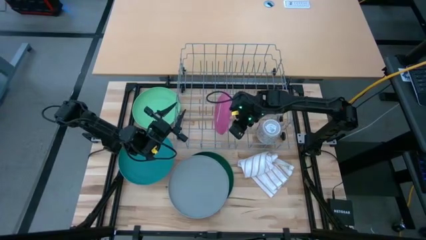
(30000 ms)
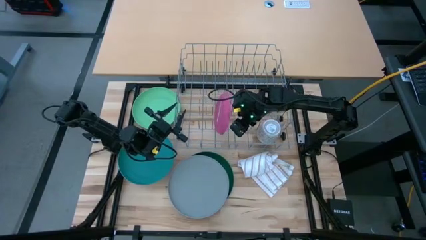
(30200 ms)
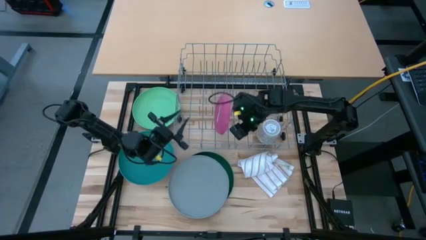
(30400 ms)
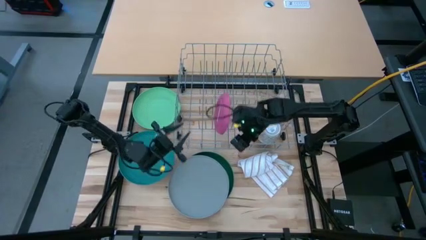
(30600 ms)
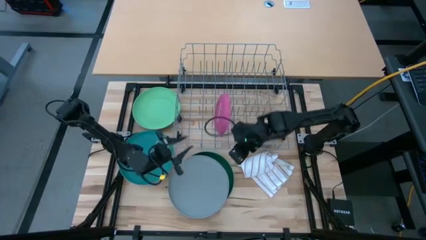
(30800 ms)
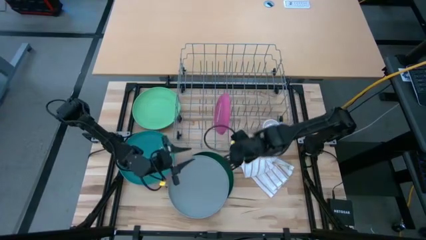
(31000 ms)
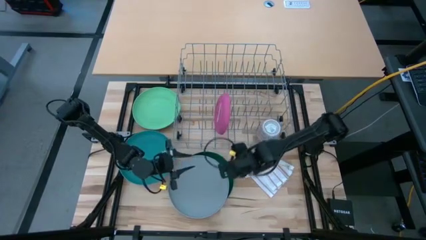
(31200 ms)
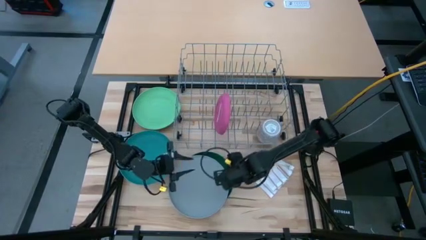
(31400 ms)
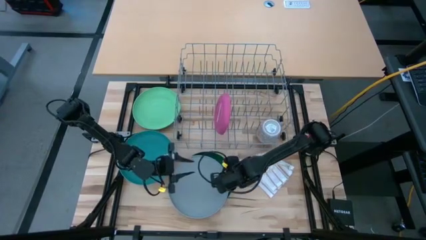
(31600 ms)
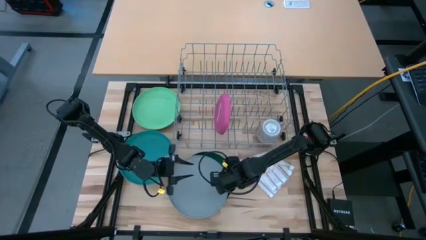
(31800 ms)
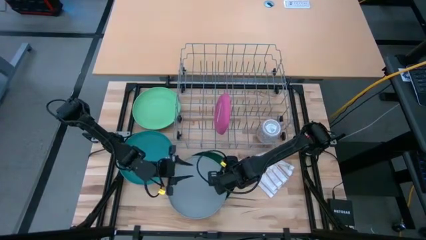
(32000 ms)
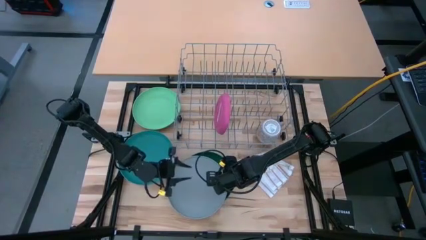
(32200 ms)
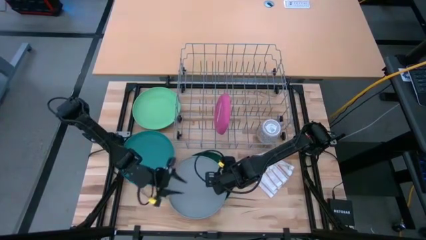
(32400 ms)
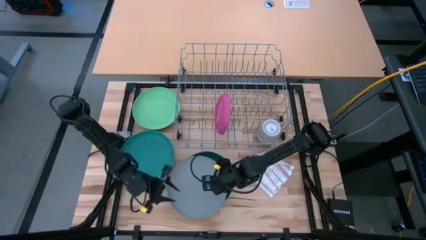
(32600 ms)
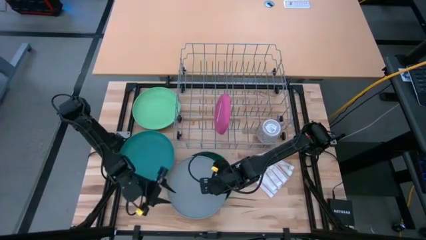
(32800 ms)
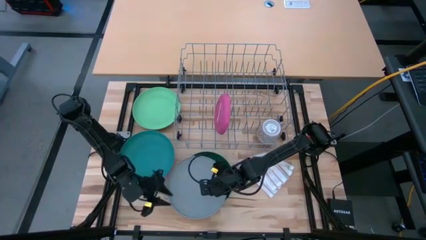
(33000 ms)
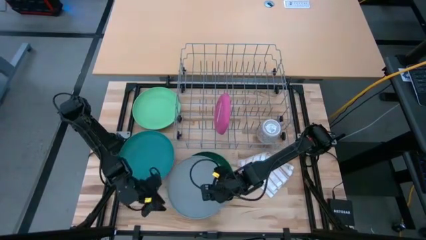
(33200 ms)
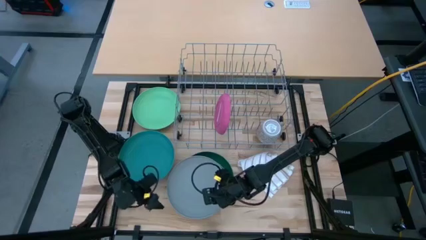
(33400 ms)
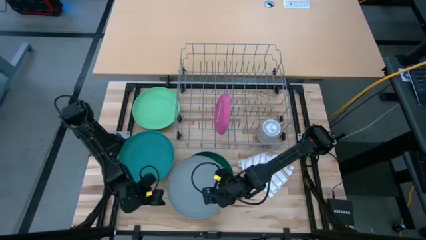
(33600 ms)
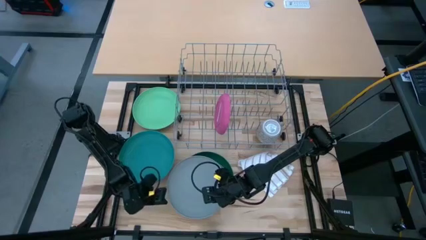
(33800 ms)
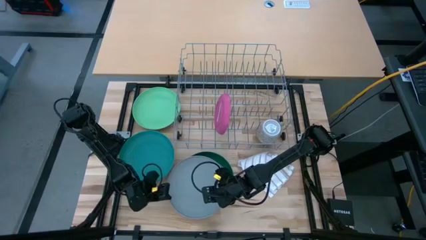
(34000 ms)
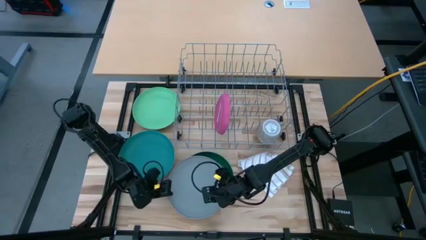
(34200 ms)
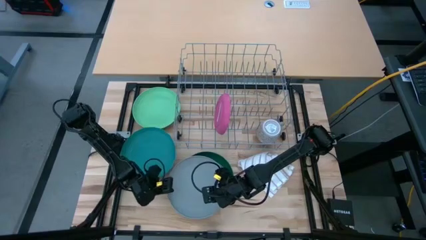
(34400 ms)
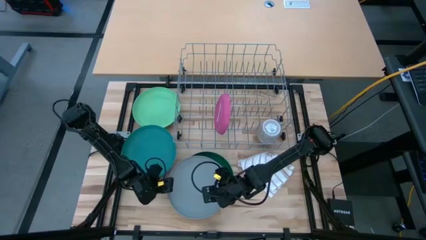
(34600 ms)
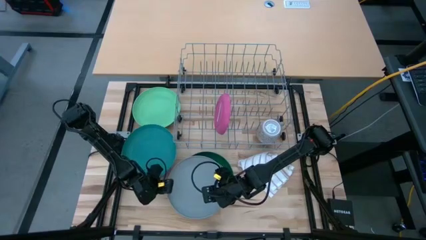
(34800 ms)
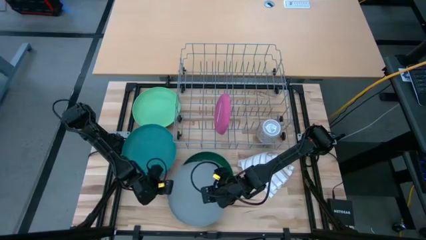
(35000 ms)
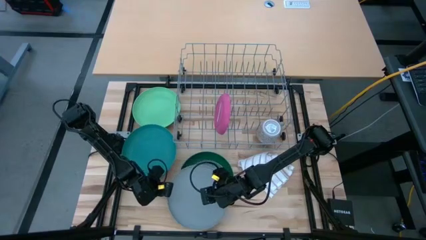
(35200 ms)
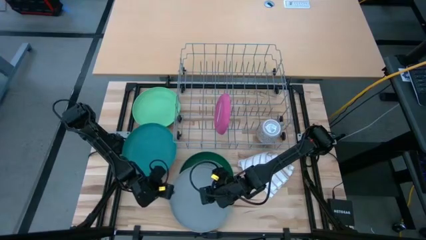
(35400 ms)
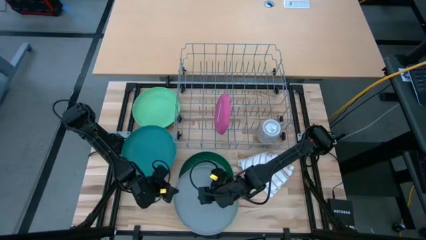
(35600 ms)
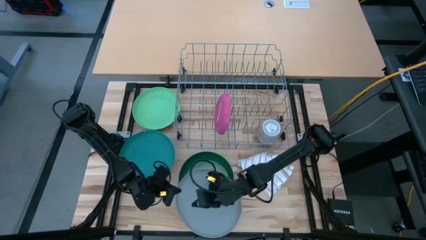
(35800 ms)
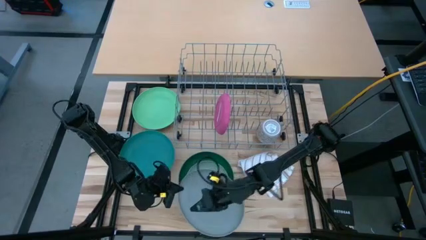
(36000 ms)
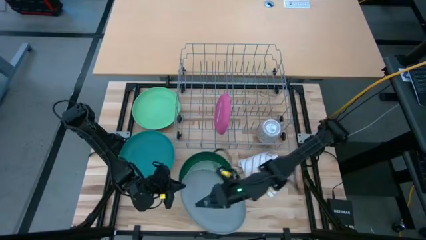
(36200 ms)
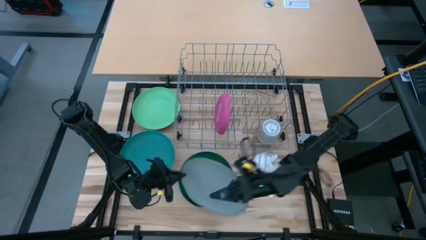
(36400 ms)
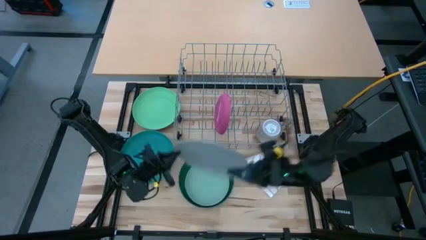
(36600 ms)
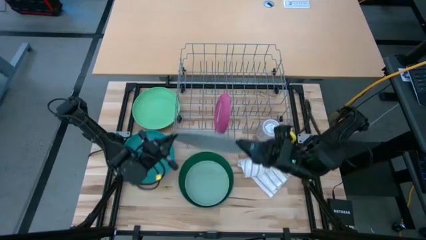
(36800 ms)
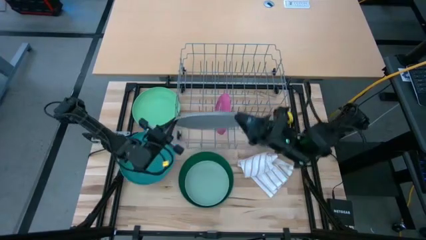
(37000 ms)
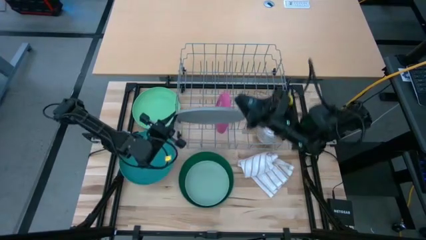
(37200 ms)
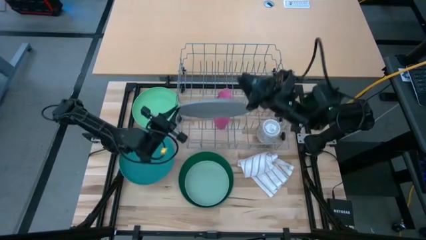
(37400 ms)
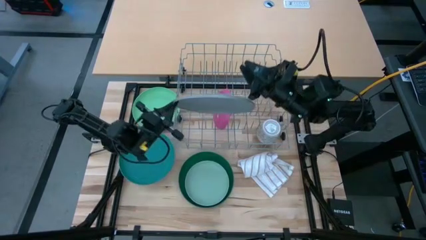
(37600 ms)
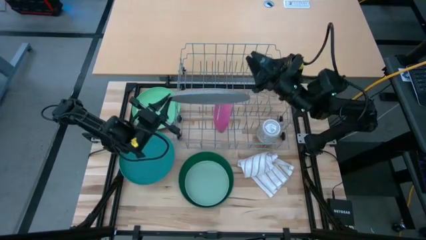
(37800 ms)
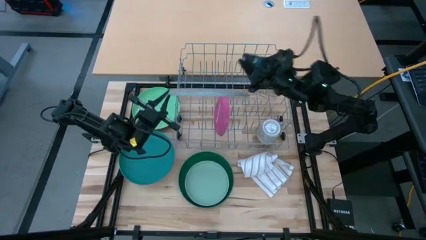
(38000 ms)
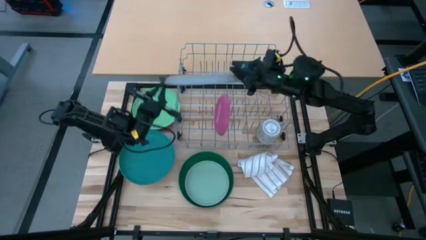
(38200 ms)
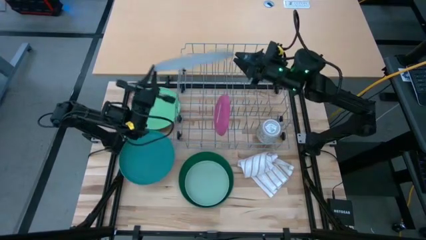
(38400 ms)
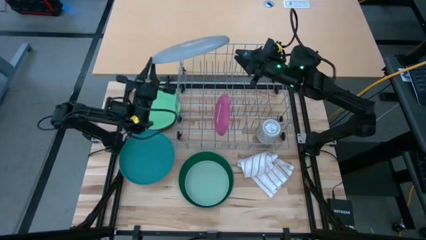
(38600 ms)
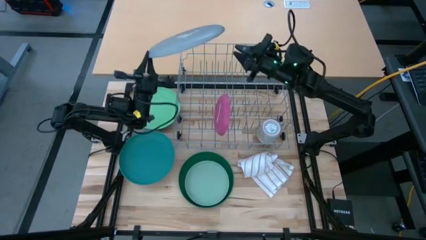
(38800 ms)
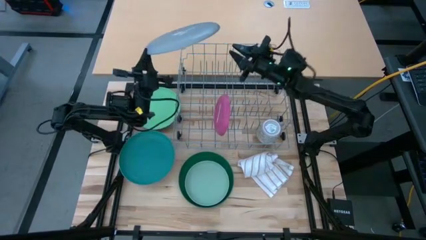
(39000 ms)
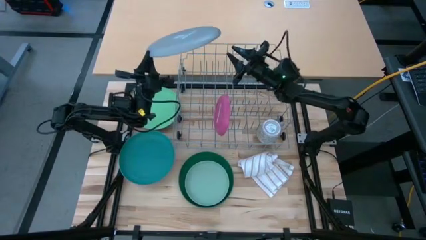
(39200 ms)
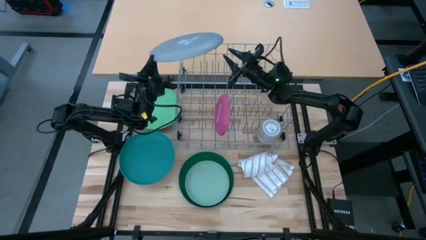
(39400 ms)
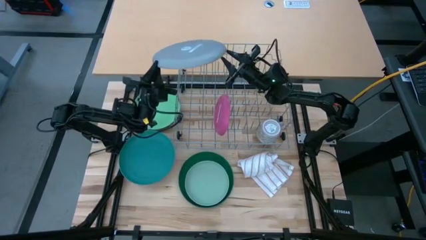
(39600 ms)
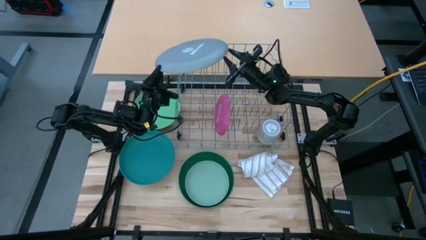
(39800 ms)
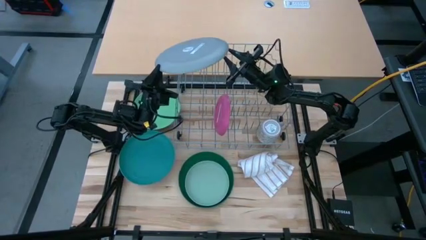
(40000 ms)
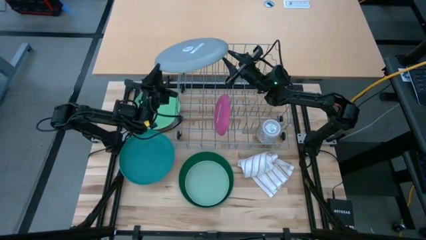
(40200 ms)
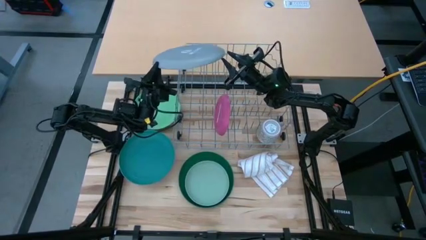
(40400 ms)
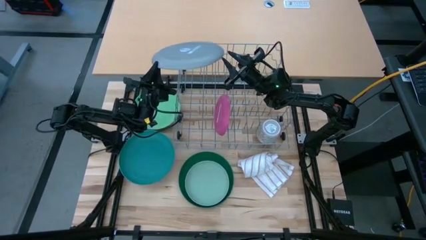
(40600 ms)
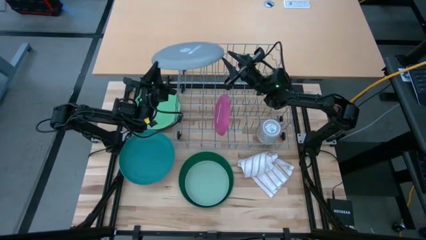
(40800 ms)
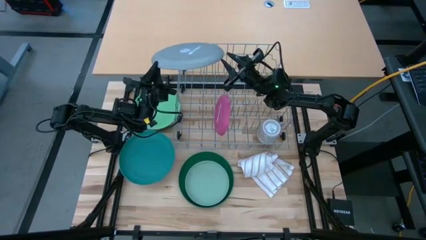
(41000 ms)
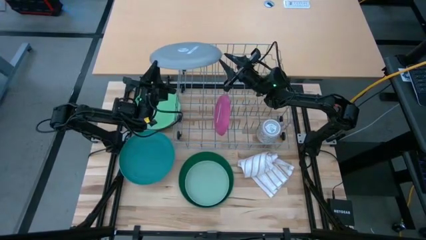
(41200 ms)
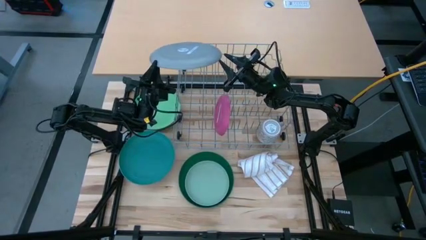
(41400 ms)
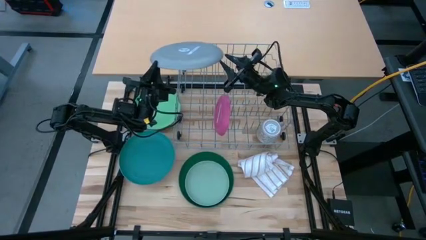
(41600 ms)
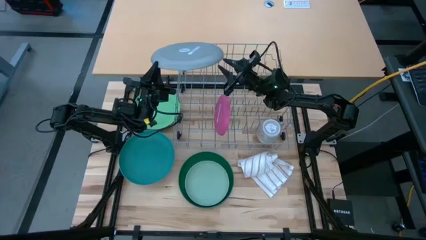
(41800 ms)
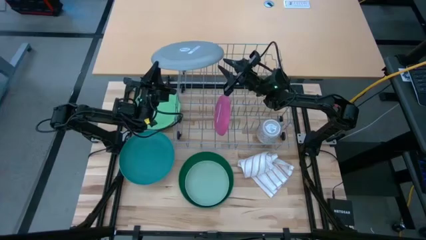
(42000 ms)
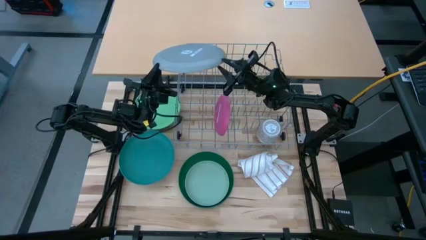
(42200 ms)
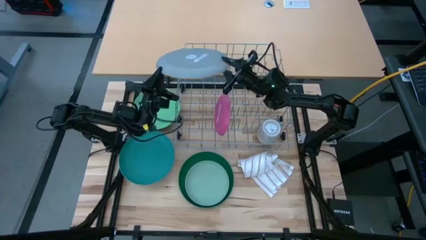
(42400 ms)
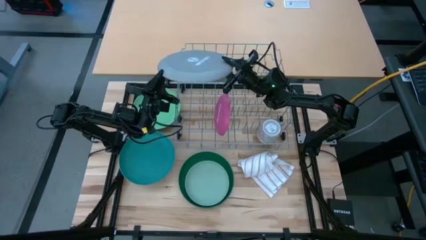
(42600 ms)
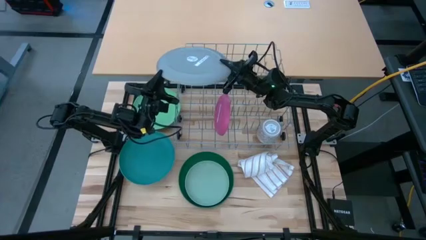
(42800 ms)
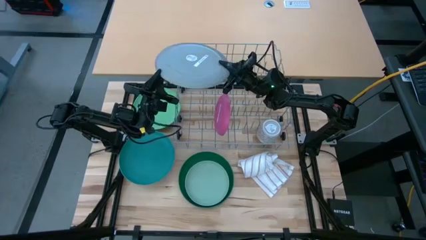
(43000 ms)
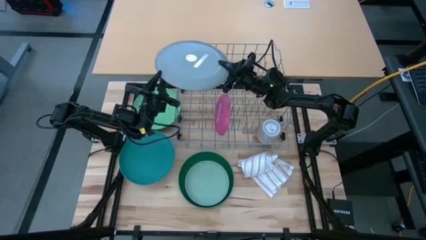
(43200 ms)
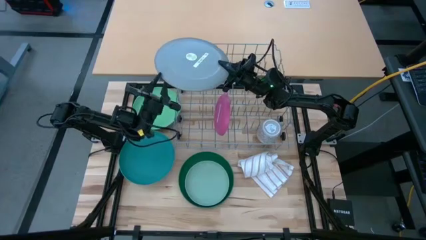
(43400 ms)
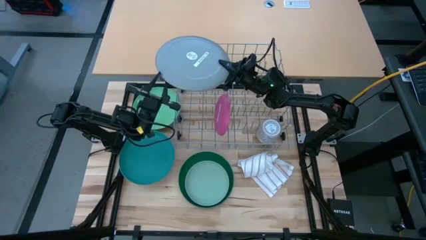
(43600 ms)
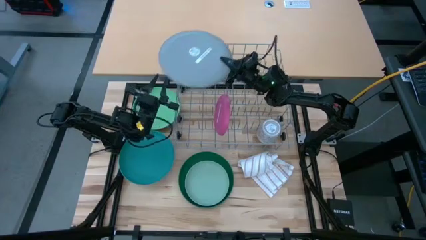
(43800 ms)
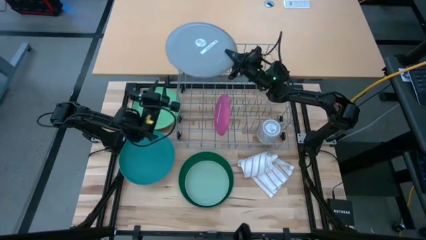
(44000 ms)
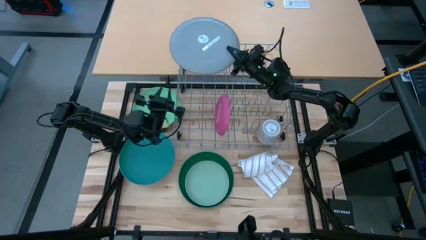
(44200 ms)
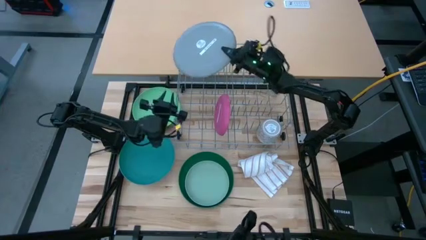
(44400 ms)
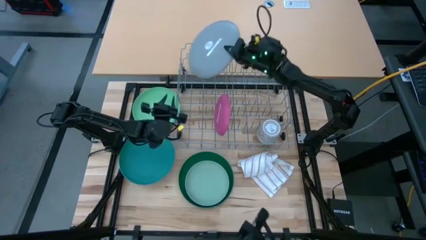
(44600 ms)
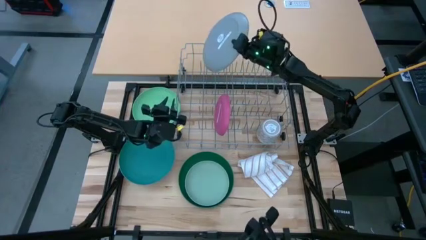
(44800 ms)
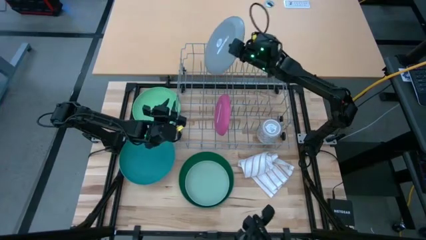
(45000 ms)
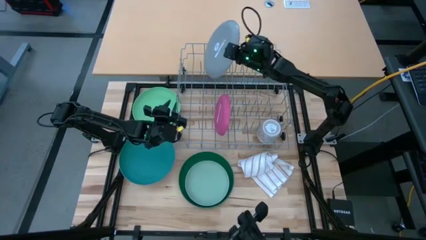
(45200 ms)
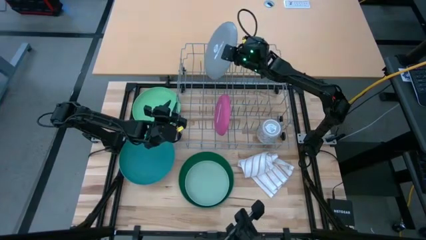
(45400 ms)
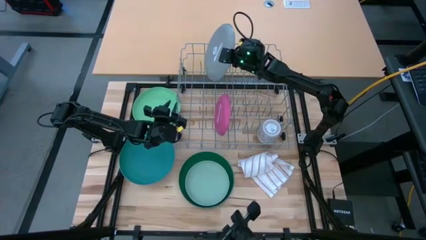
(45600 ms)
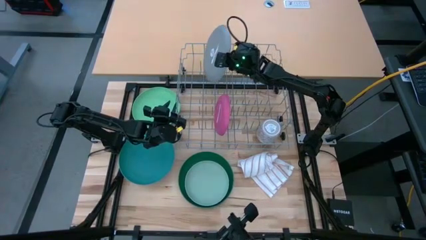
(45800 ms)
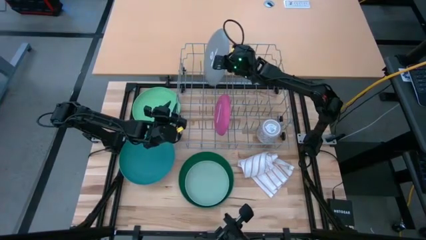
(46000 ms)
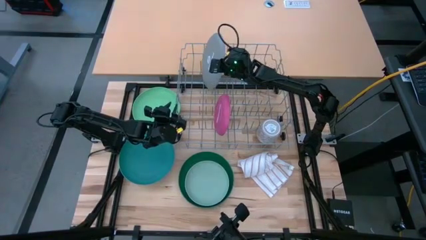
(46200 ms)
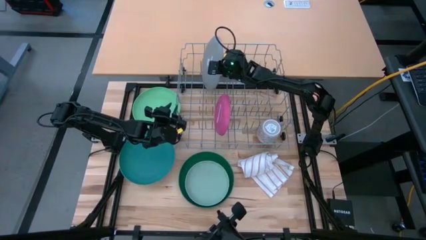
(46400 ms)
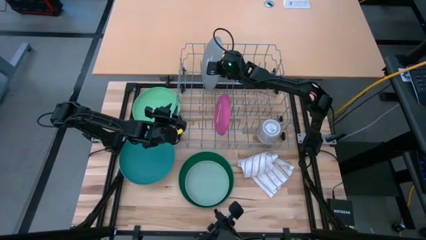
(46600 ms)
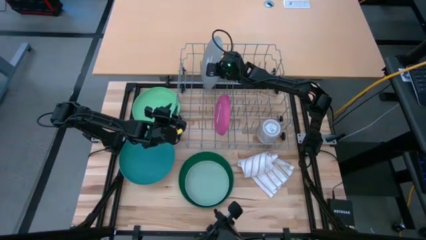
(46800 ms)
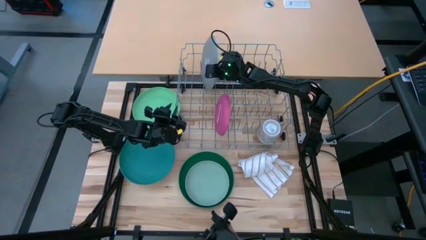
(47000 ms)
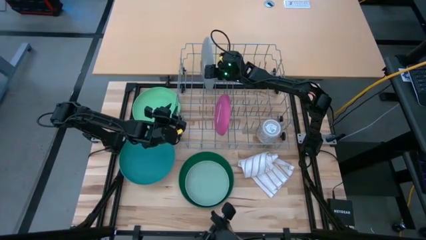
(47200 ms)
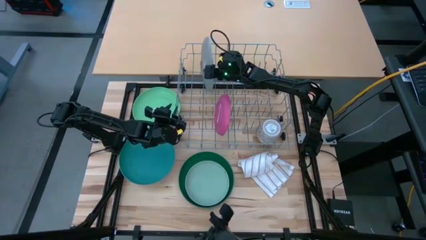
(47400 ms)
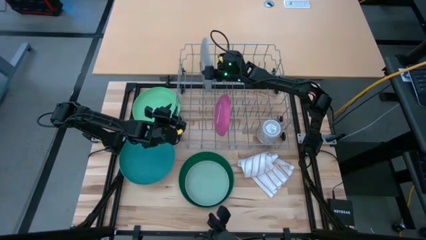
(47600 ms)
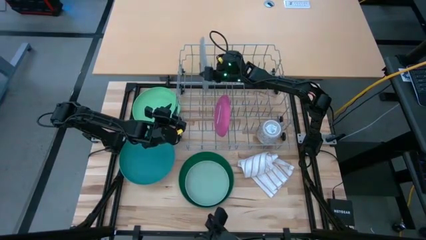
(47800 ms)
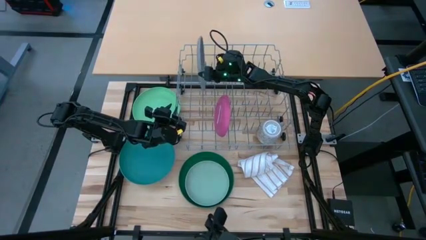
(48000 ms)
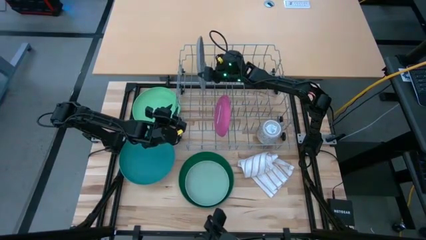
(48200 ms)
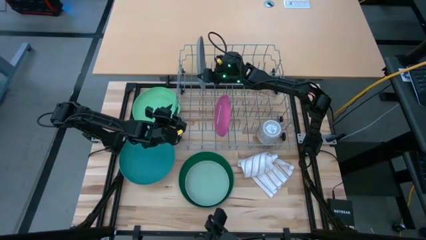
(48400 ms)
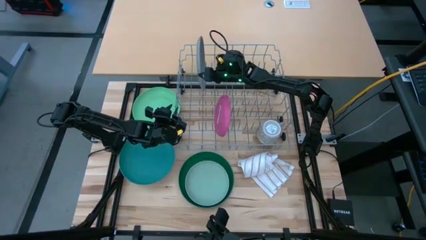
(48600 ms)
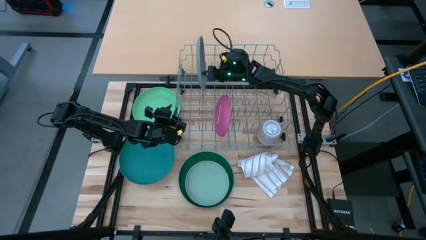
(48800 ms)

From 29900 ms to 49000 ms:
Task: Sort dishes
Put the gray plate in the dish rack
